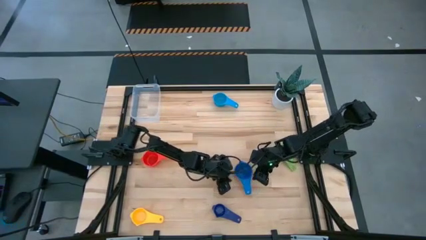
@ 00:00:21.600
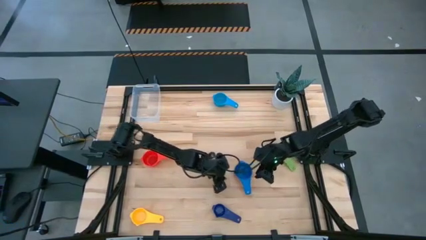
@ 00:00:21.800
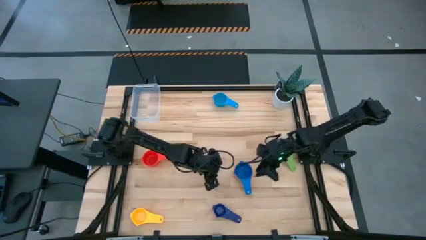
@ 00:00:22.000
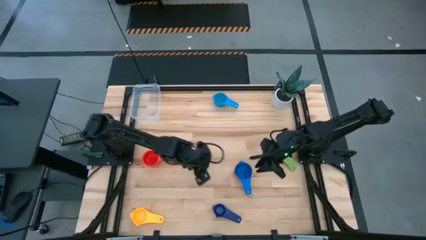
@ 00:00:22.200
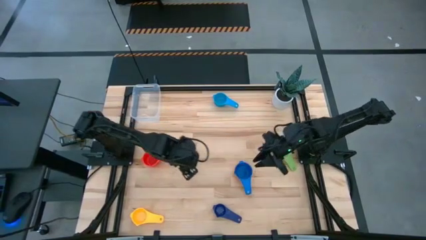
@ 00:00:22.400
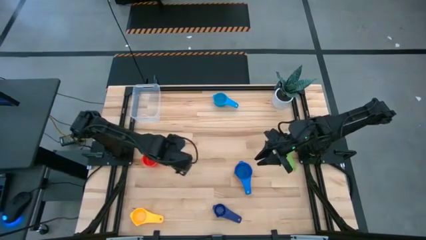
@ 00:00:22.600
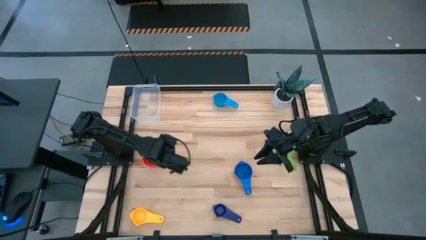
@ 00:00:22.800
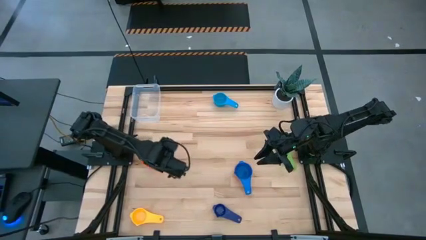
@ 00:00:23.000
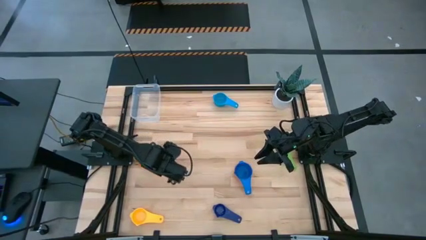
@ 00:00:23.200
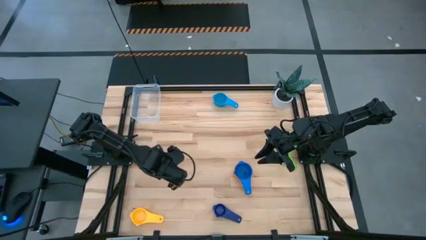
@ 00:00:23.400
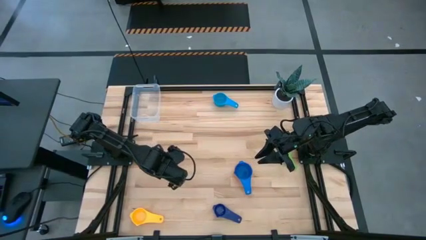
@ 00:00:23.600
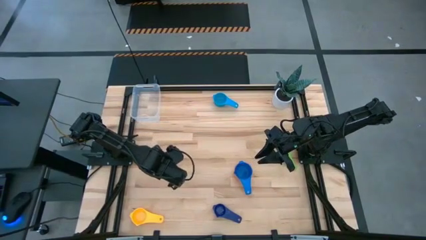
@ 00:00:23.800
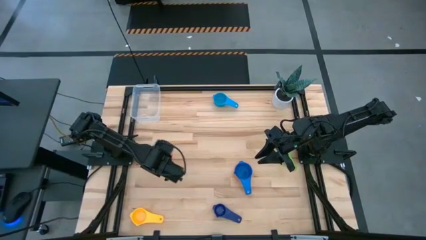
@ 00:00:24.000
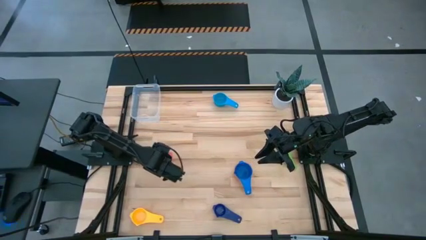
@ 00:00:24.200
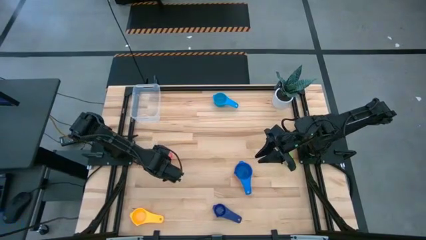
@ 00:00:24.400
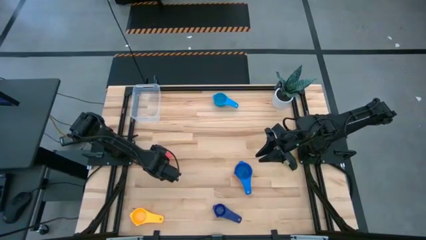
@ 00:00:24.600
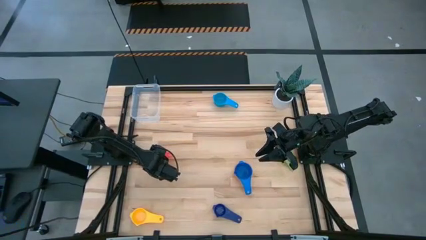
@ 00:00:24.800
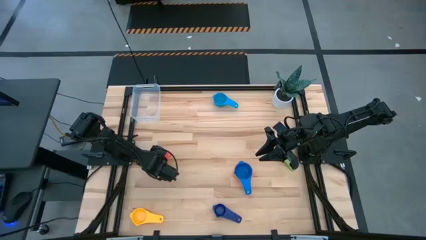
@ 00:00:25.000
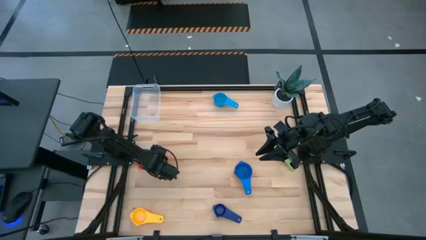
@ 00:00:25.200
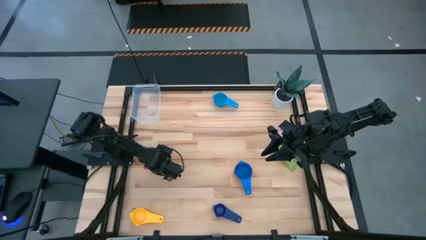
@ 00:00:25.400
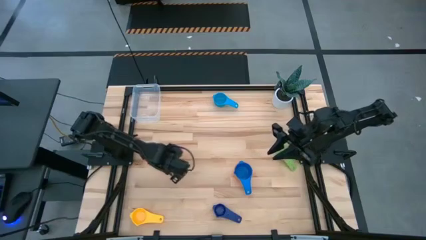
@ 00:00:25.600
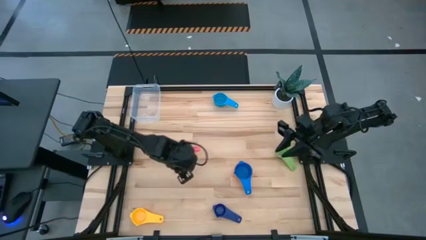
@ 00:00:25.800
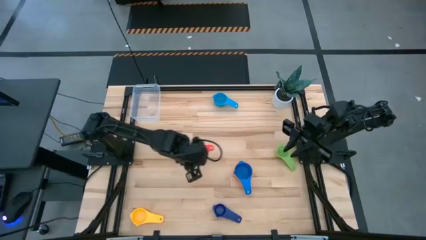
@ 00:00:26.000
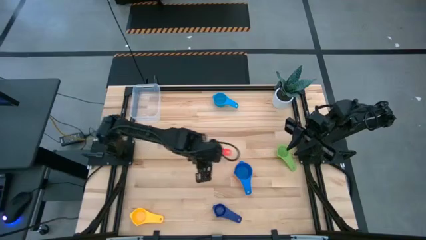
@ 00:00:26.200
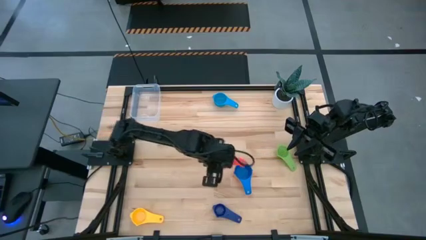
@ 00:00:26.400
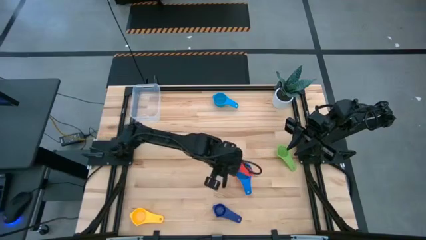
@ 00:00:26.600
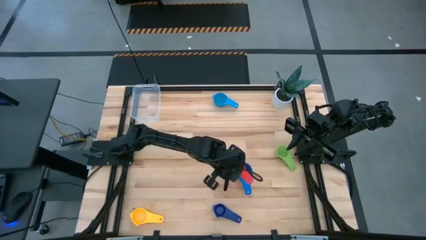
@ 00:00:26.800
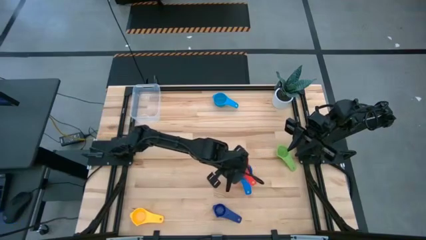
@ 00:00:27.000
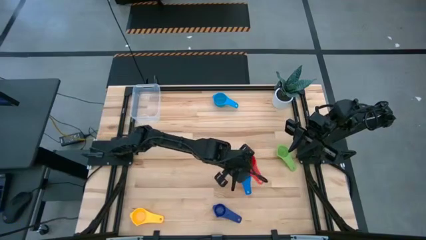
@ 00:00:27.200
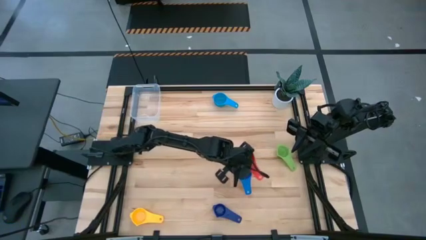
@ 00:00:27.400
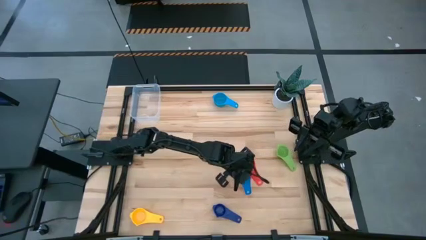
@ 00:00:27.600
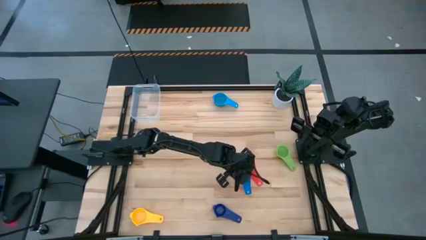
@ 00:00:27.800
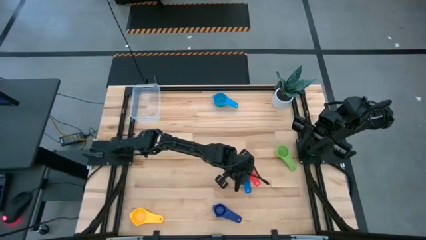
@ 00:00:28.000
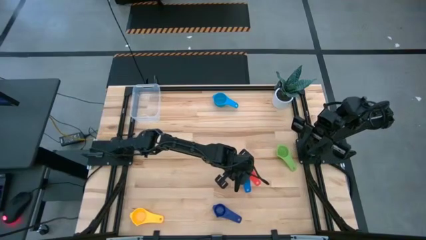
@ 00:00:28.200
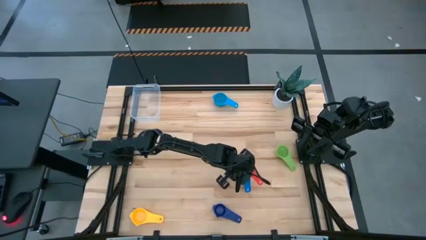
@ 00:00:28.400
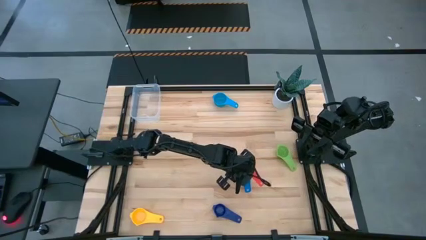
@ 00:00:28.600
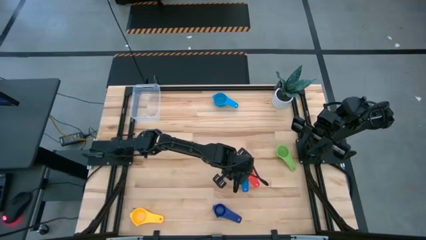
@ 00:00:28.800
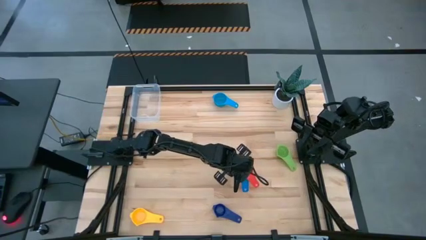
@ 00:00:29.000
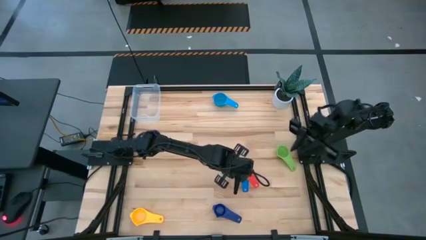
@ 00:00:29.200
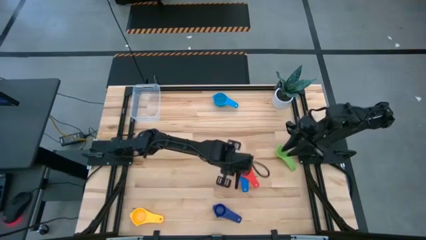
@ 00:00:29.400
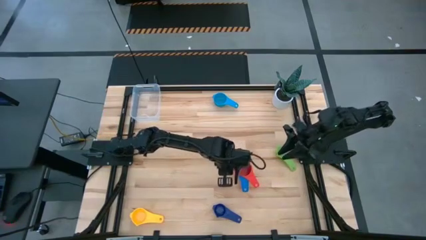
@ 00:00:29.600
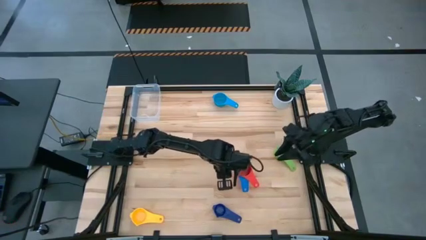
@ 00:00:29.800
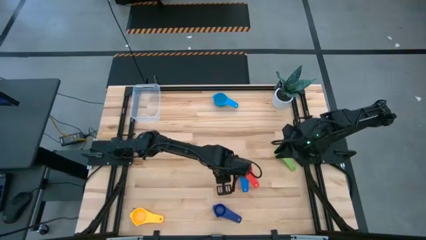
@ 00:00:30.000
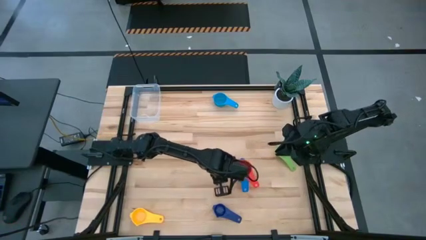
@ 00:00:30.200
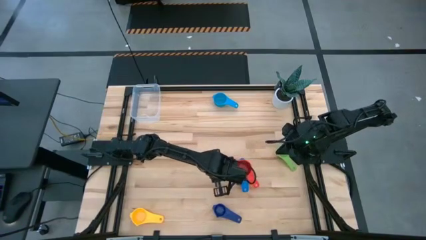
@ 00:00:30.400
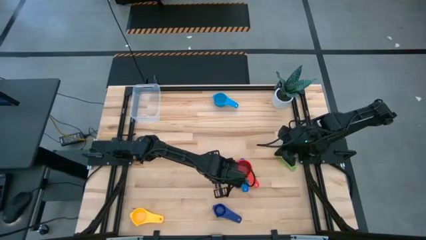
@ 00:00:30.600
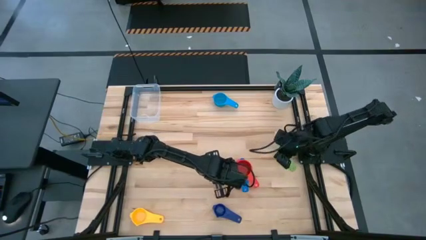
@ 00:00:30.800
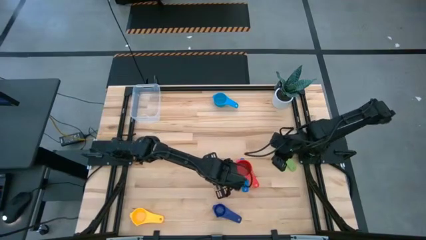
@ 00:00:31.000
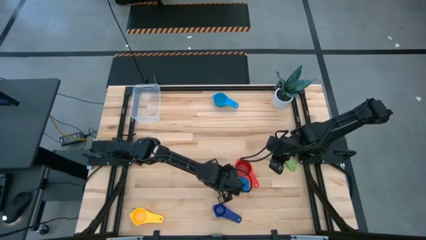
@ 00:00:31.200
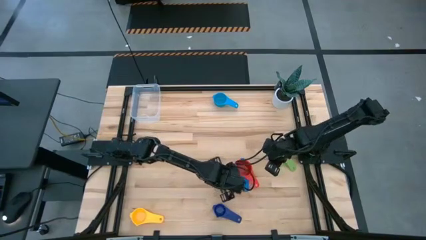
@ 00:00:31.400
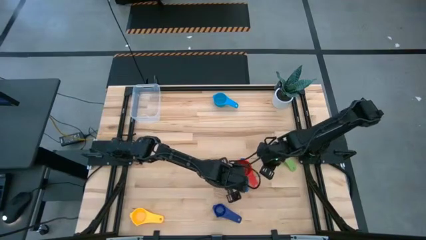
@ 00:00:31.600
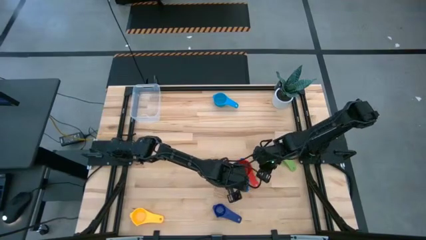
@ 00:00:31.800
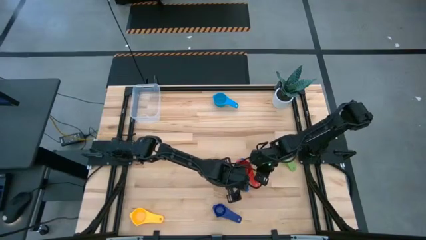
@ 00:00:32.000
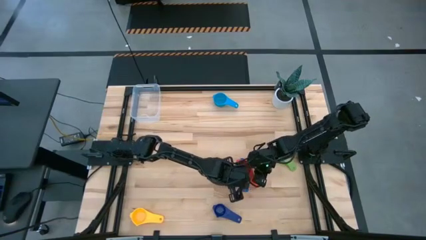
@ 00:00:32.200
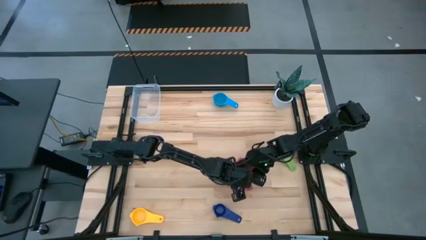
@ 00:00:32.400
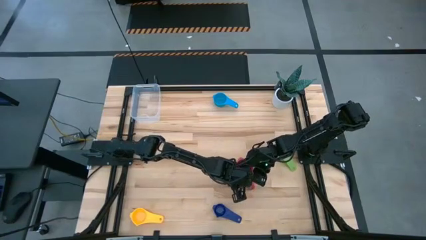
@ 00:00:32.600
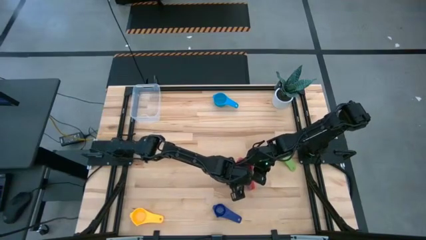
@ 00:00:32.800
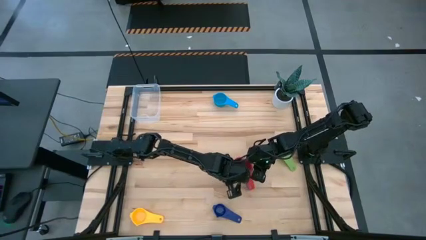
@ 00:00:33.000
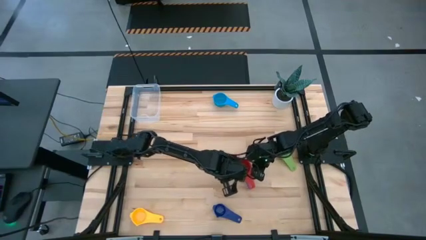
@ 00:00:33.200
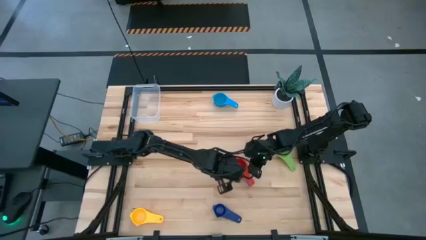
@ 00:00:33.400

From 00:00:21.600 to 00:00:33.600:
Task: Nest measuring cups in basket
Stack the red measuring cup on top of the blue measuring cup

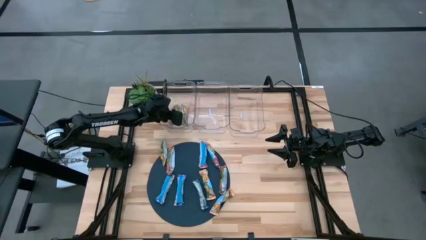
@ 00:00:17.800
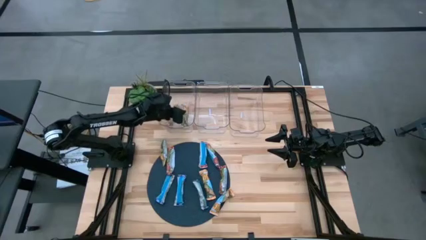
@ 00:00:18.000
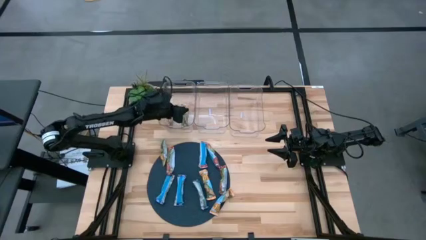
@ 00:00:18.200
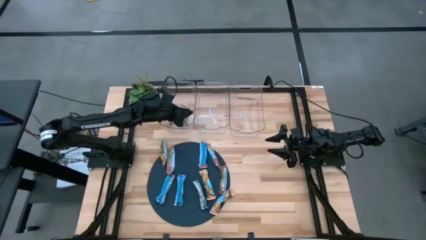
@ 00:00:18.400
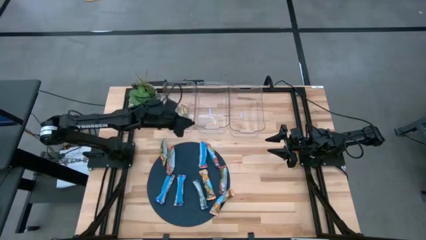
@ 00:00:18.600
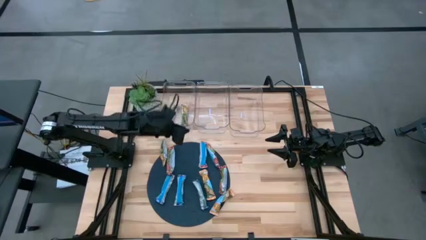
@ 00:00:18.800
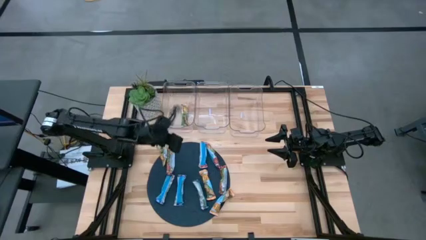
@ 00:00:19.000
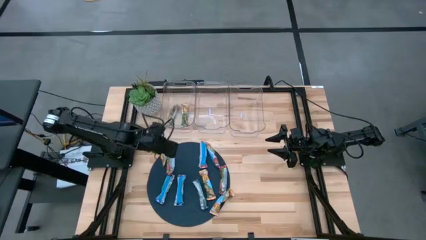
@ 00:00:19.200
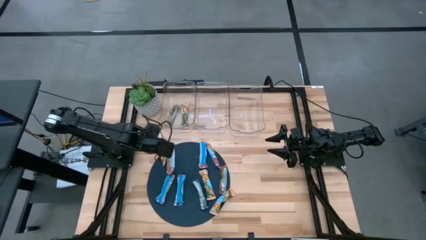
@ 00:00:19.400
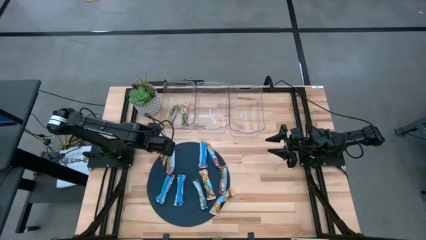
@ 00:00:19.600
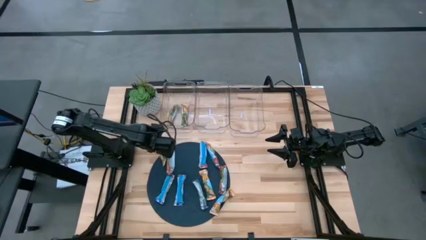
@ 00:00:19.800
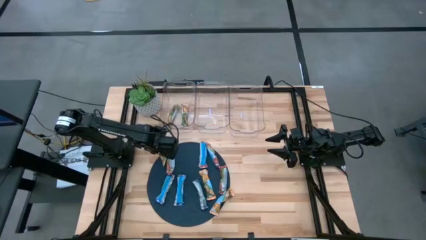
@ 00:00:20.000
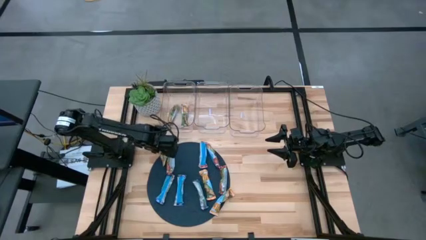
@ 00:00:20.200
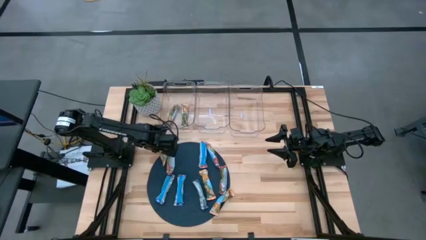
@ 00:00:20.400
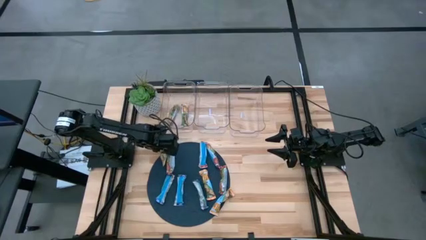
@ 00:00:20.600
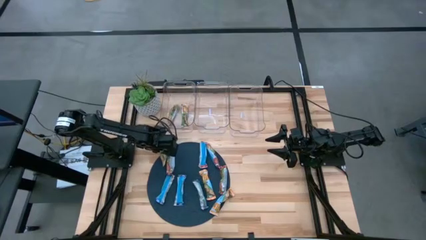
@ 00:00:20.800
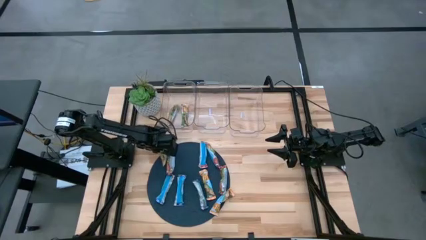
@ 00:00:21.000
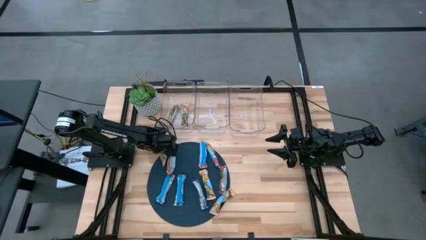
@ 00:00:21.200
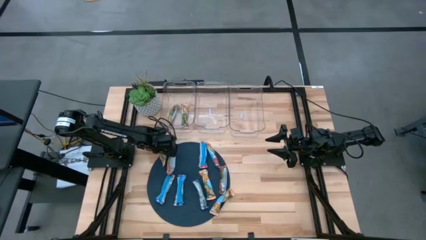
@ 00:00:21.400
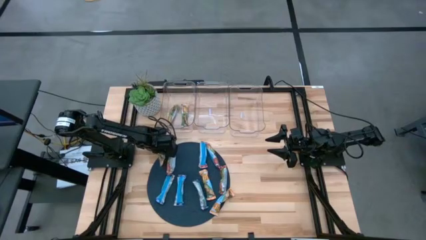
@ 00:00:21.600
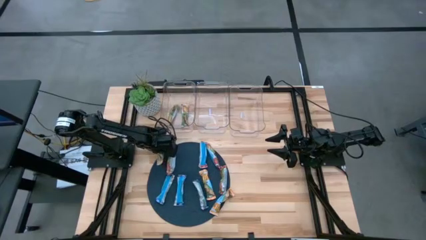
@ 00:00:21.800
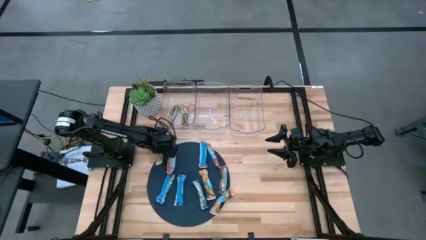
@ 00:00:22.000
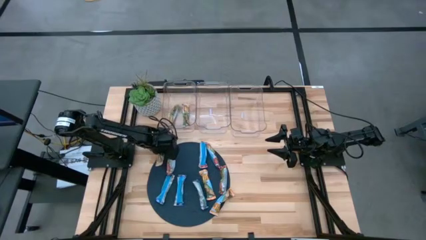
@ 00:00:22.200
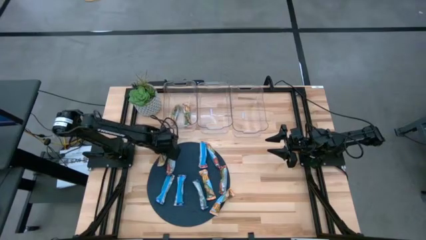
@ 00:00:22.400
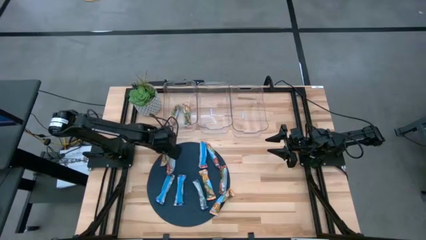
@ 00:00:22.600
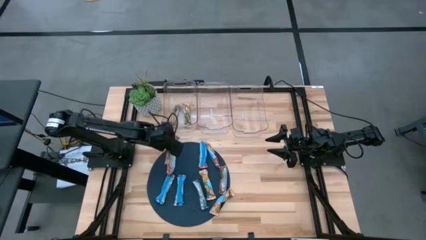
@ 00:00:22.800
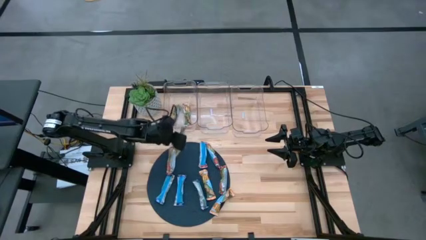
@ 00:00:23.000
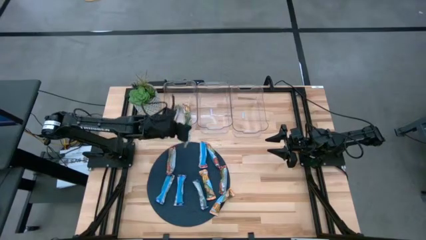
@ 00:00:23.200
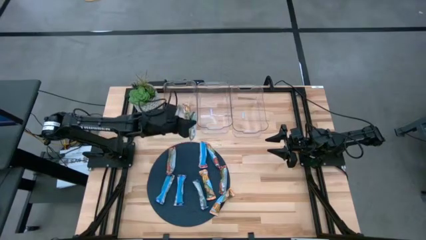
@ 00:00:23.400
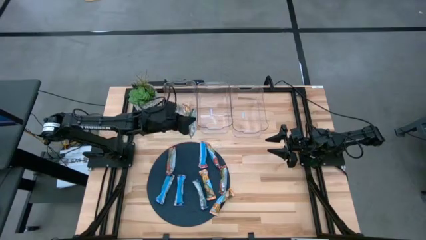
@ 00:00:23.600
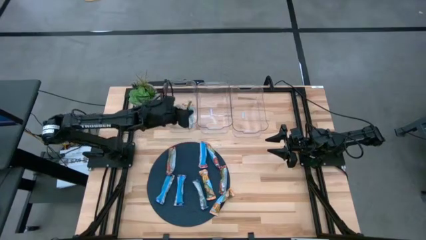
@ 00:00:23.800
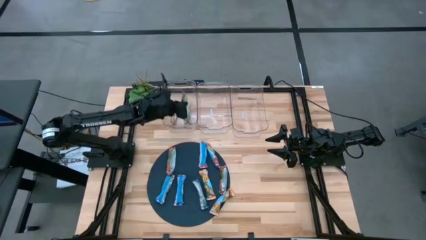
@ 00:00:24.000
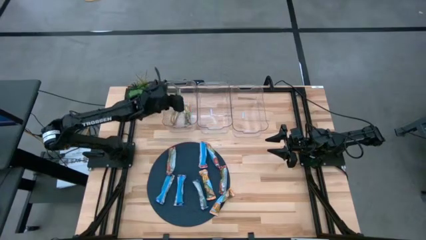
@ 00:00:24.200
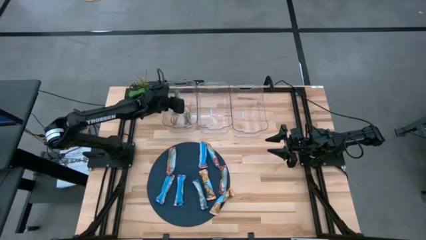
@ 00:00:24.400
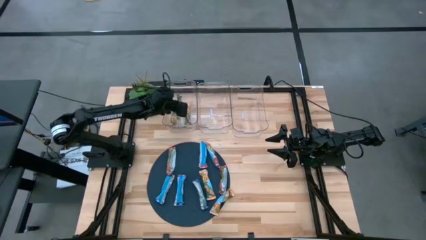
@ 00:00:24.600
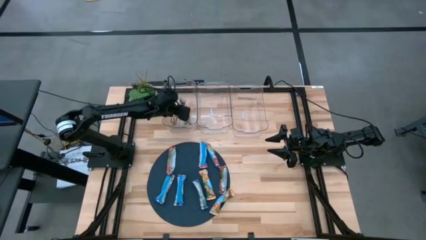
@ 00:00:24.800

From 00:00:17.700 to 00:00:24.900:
Task: Pick and place Granola Bars by type
Put the orange granola bar into the left transparent bin
